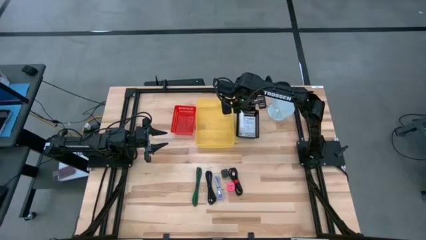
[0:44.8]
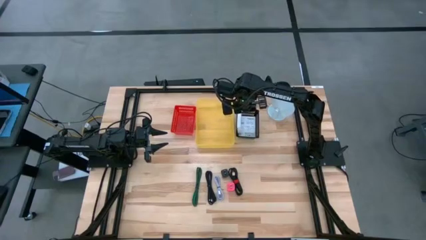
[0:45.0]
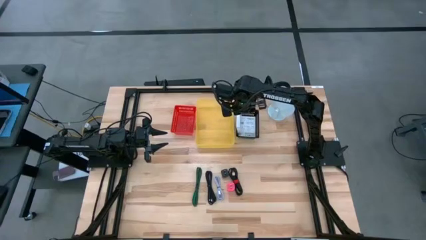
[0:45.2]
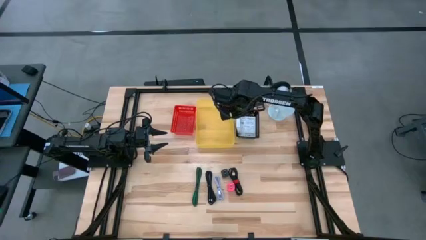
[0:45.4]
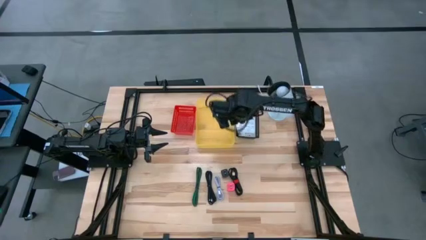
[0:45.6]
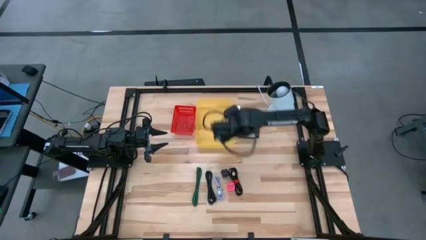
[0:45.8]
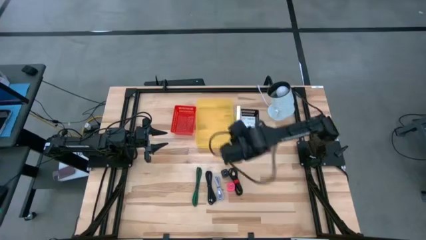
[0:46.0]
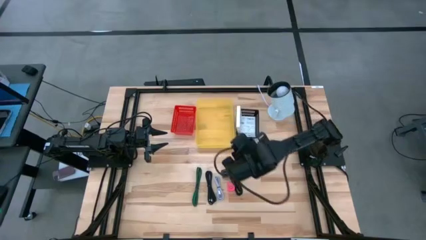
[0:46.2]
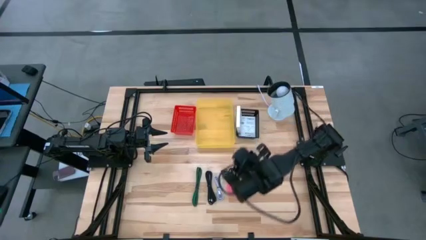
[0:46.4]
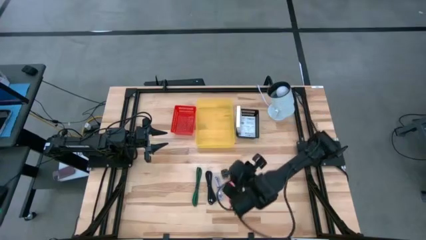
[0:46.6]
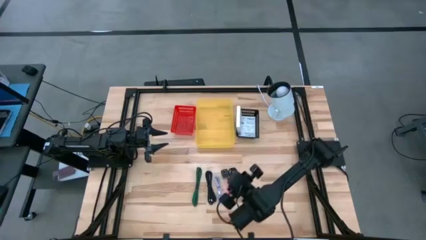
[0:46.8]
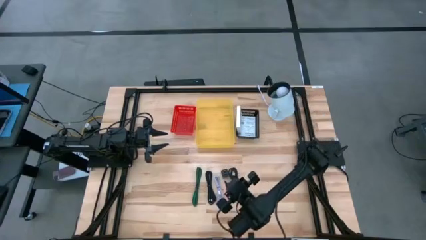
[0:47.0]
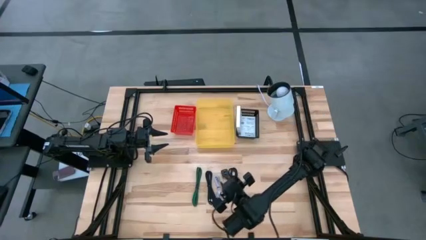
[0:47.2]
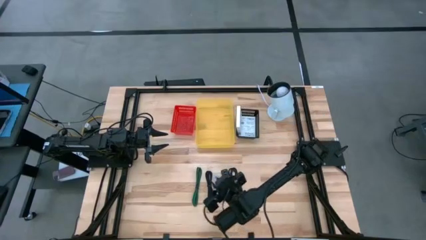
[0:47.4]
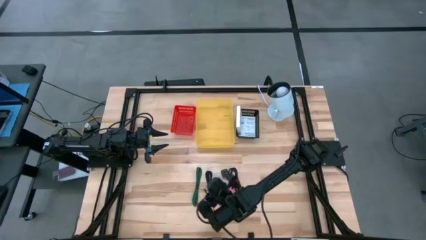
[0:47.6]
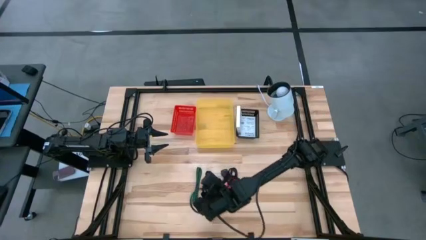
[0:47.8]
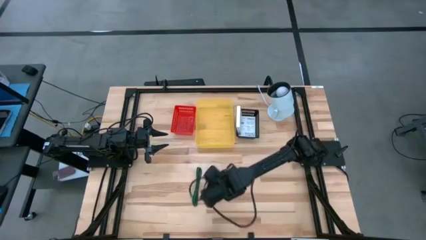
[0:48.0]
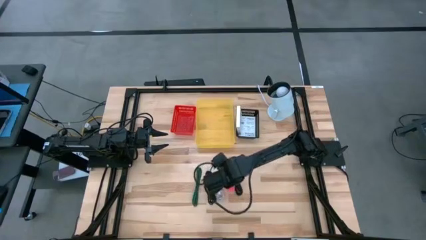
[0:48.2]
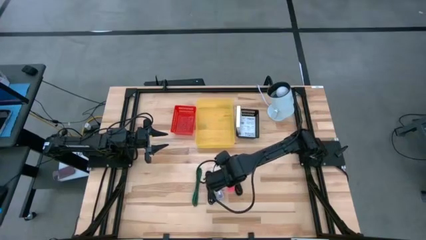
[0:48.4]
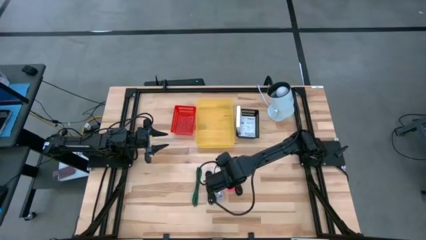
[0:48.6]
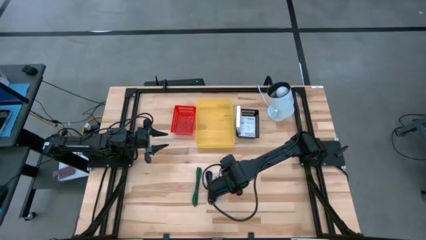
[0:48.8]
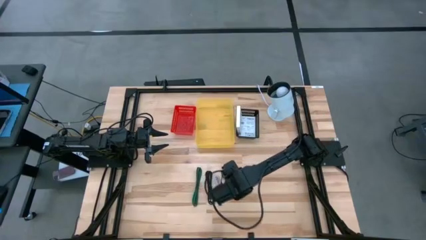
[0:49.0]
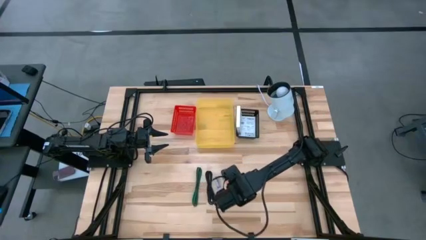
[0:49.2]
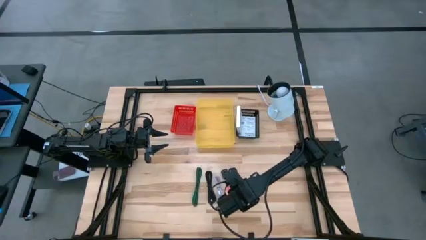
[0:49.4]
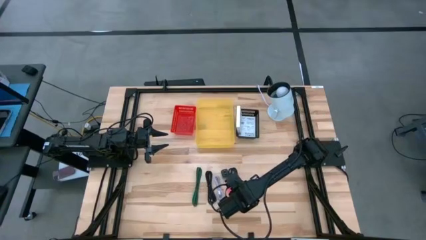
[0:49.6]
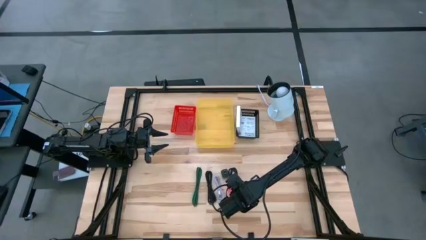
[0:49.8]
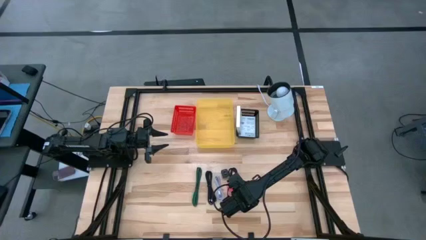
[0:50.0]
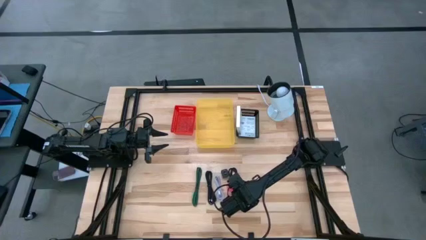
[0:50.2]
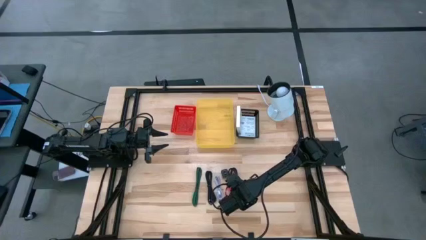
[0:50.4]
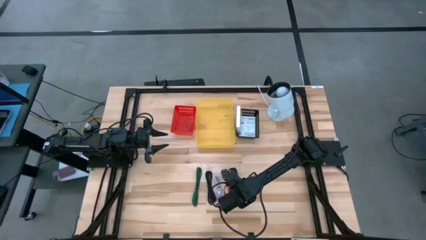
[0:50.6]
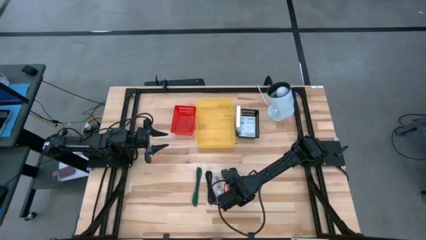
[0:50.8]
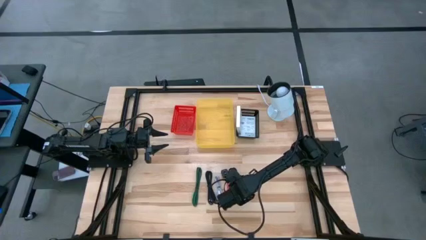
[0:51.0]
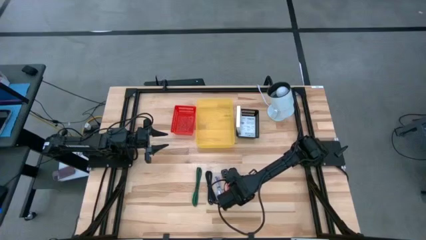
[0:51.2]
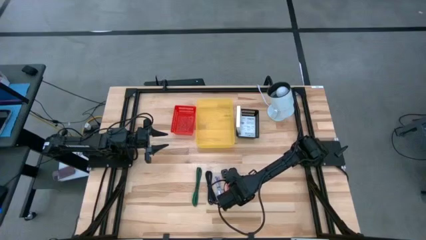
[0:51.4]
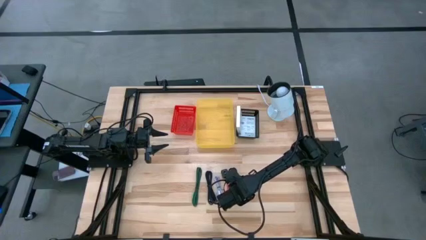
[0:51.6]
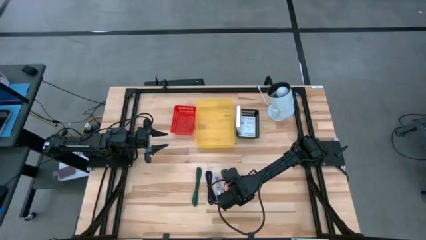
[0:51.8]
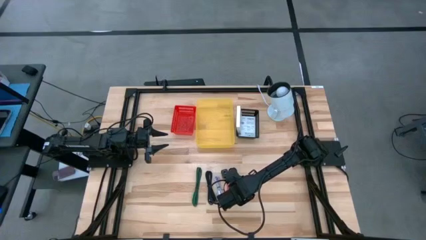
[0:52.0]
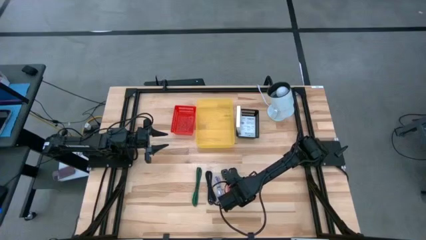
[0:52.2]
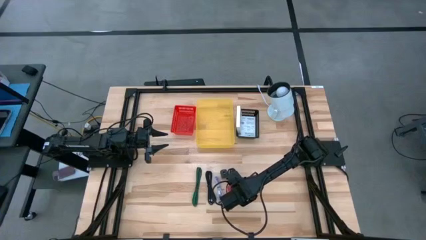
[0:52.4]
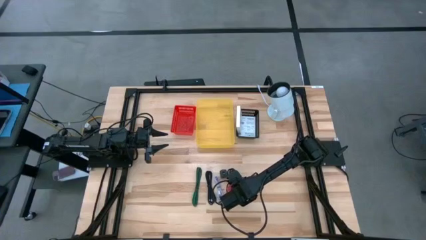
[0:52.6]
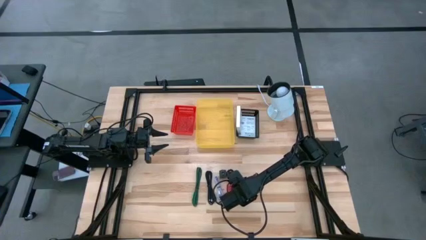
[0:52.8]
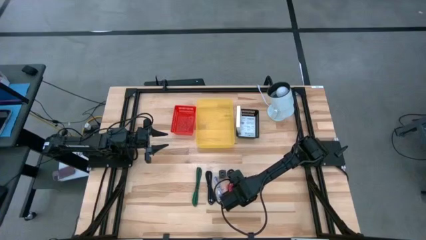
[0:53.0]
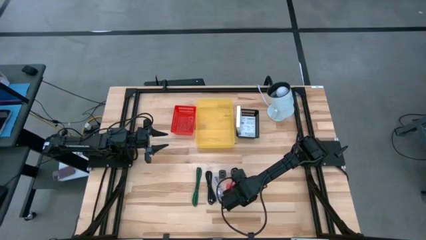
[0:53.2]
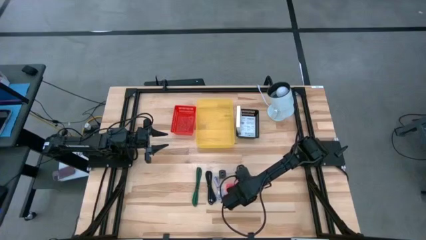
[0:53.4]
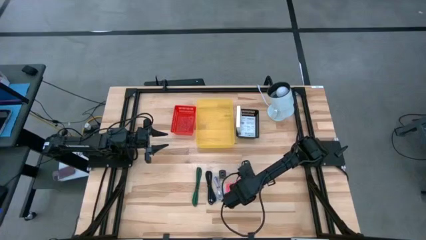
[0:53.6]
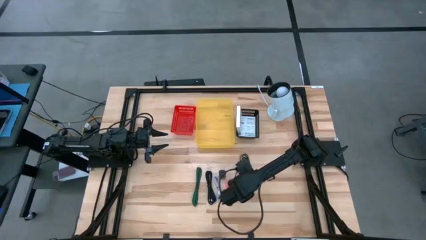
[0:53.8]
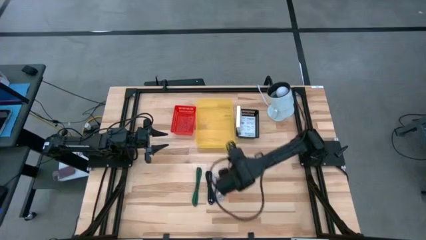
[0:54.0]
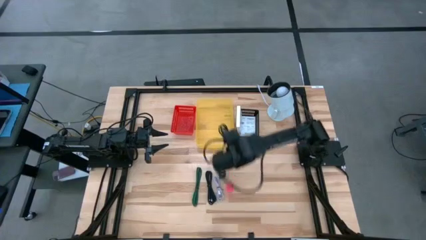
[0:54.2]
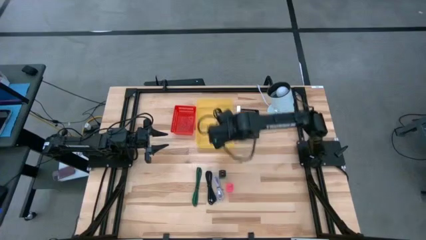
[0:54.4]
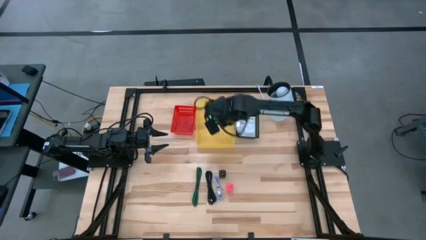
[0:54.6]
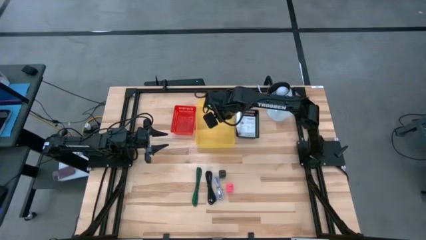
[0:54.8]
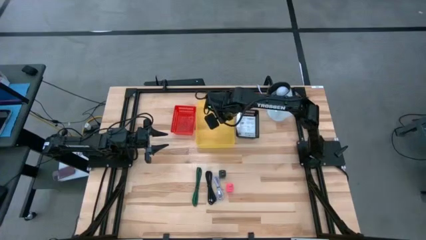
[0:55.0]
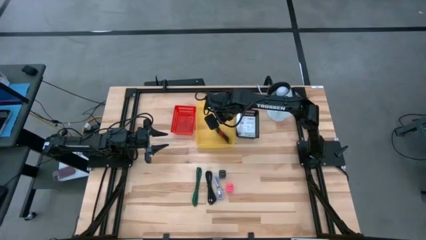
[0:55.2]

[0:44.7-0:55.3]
Task: Pick and place items into bin
Put the right black charger cable into the yellow bin

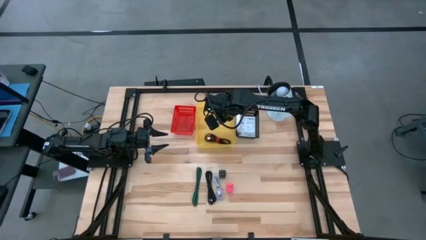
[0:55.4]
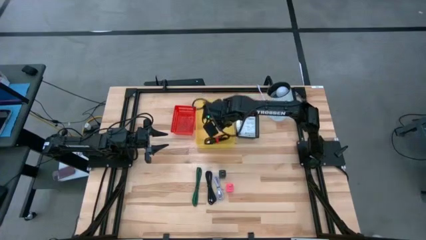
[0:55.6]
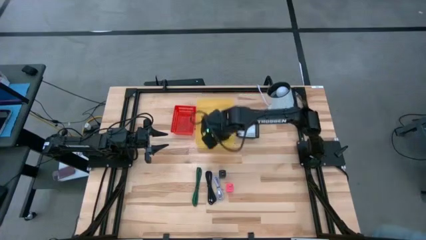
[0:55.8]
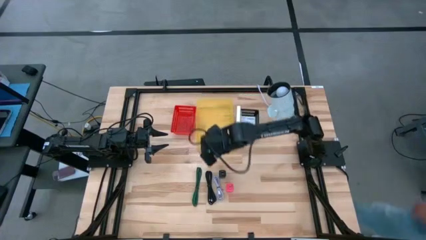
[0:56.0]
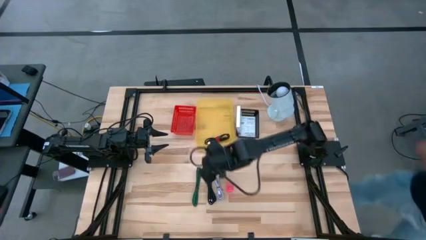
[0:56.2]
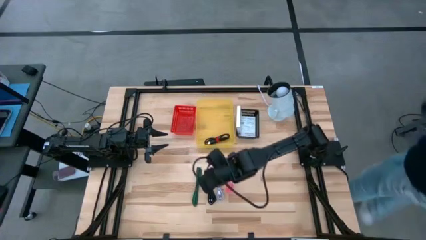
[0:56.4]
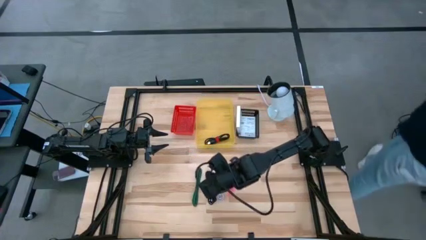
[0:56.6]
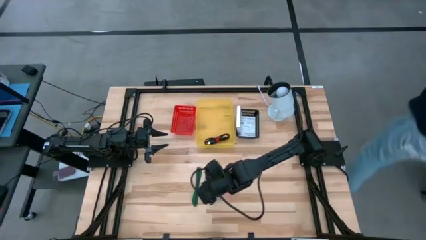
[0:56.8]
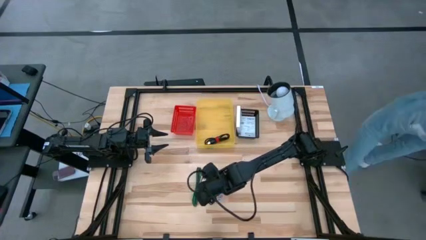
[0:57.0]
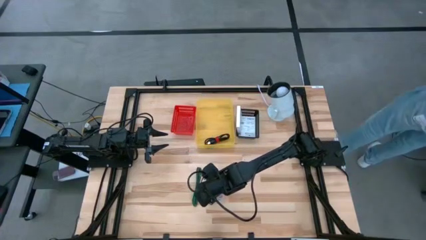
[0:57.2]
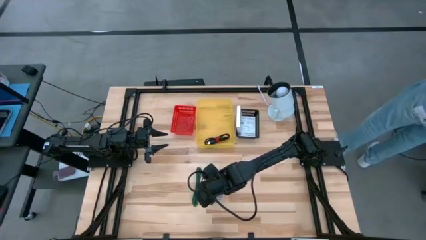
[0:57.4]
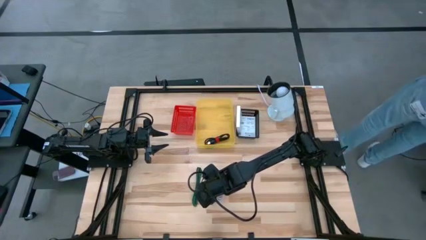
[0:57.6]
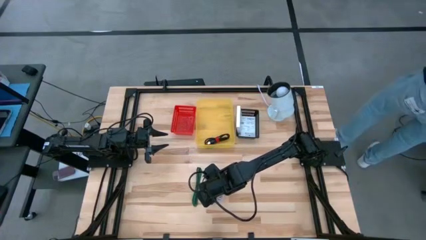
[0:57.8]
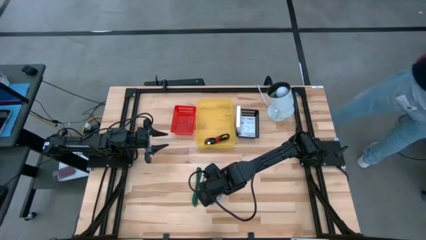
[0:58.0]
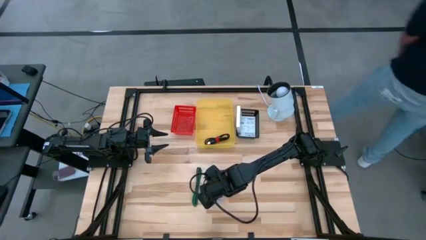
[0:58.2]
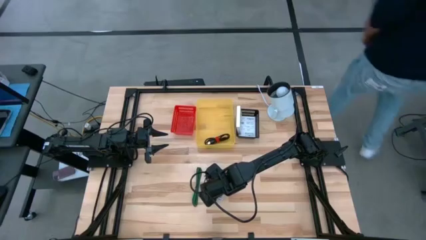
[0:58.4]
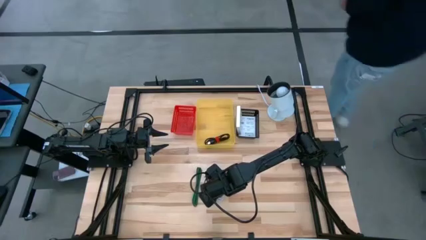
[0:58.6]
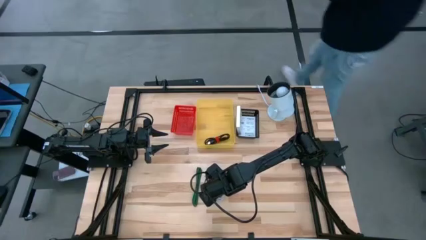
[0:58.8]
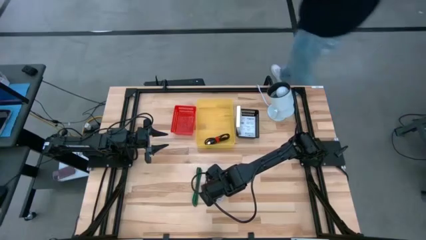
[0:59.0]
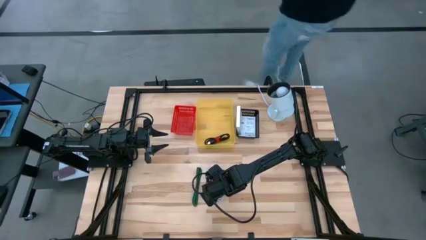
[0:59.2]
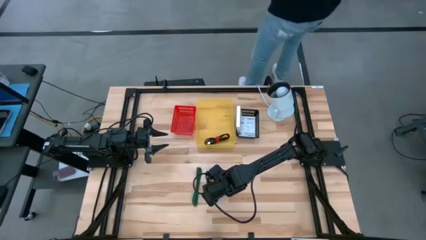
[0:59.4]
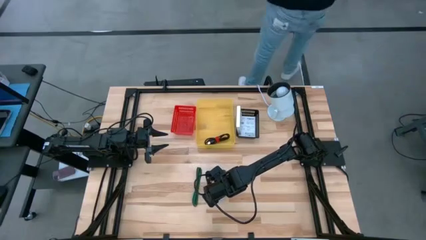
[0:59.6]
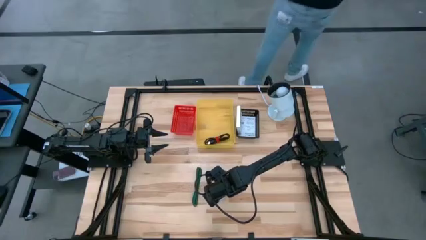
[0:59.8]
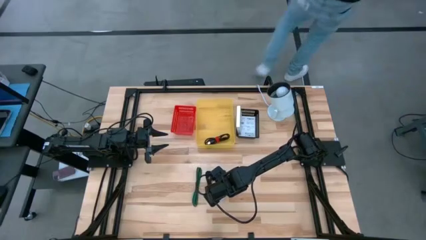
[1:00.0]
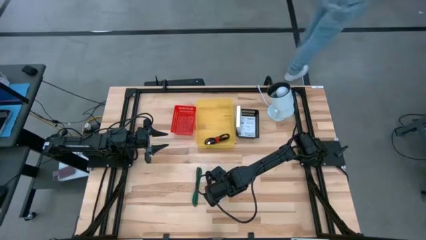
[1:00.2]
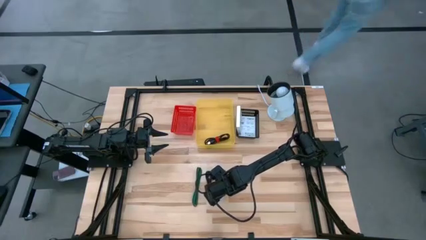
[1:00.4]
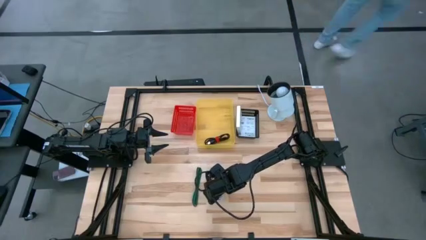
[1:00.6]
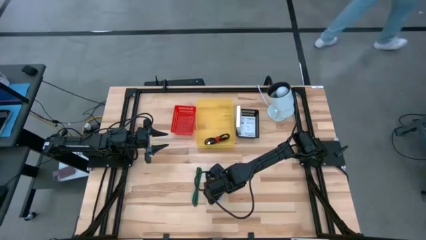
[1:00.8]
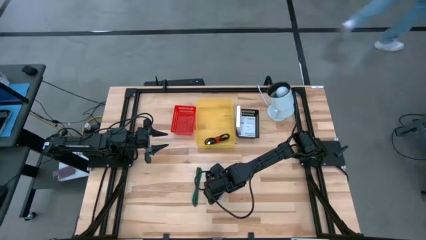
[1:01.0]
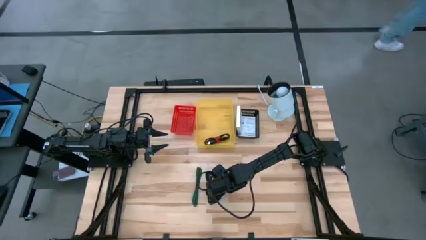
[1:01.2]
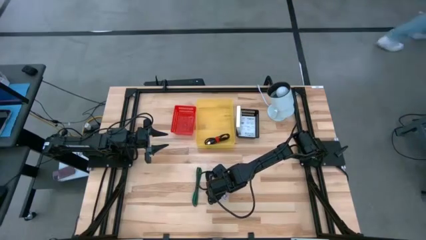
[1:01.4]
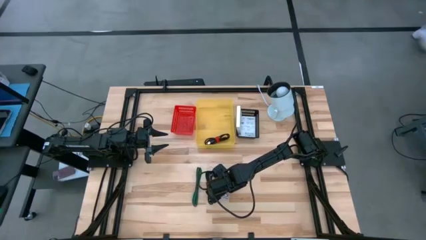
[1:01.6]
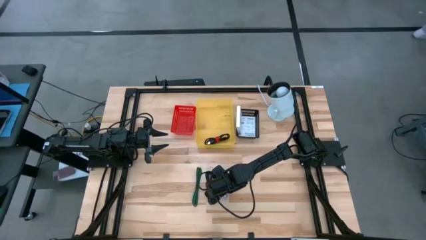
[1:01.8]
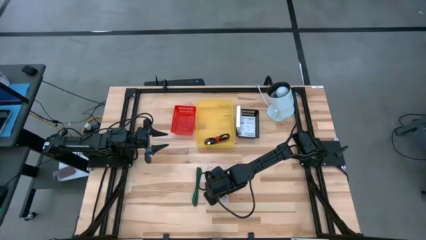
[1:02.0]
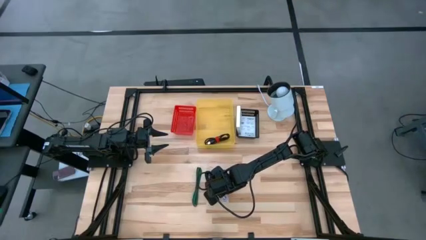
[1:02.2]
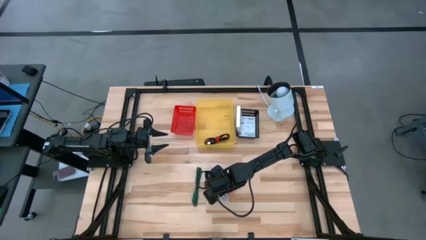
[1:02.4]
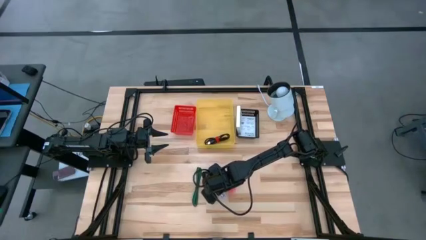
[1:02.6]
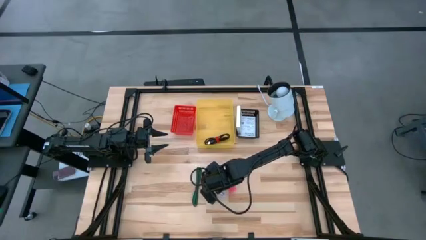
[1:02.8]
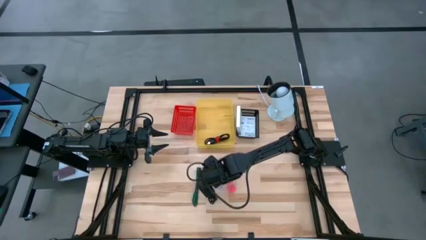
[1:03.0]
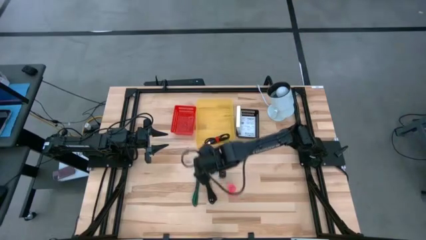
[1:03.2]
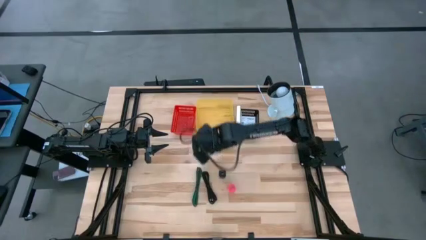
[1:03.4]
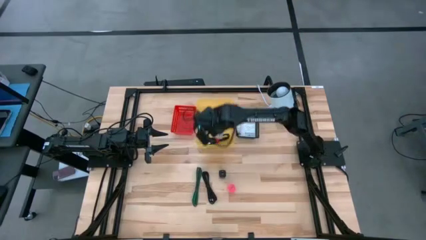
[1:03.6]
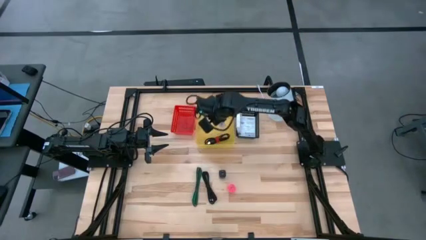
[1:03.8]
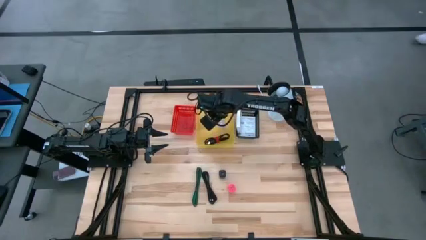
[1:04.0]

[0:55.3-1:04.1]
Put the blue charger cable into the yellow bin
